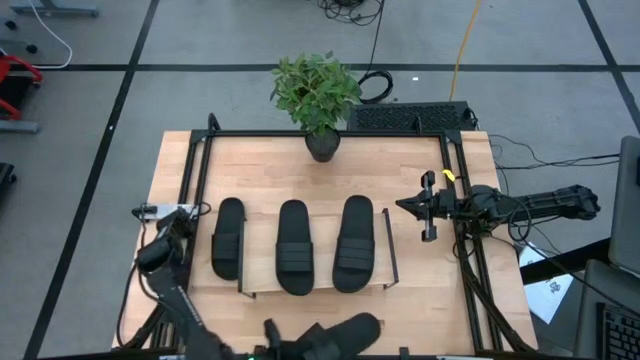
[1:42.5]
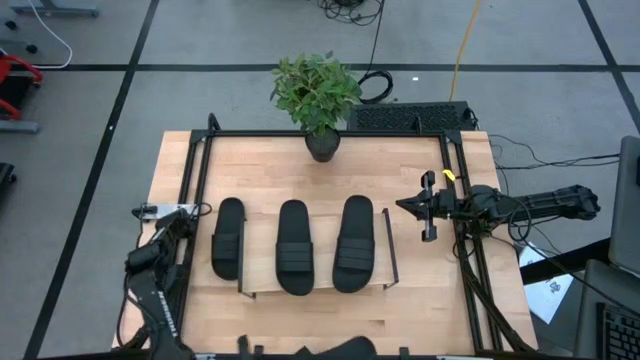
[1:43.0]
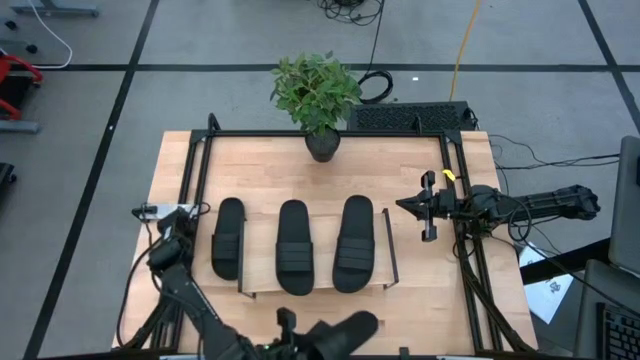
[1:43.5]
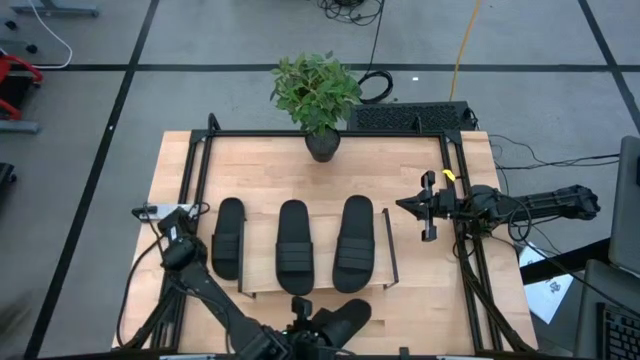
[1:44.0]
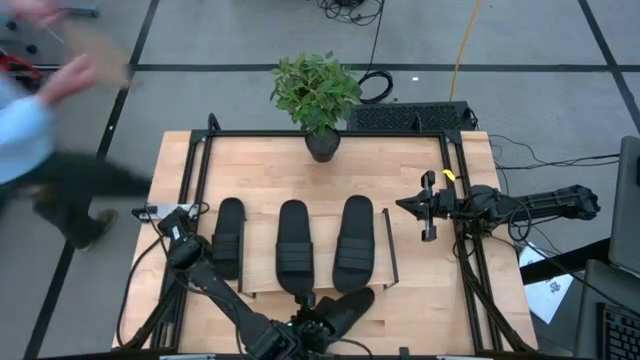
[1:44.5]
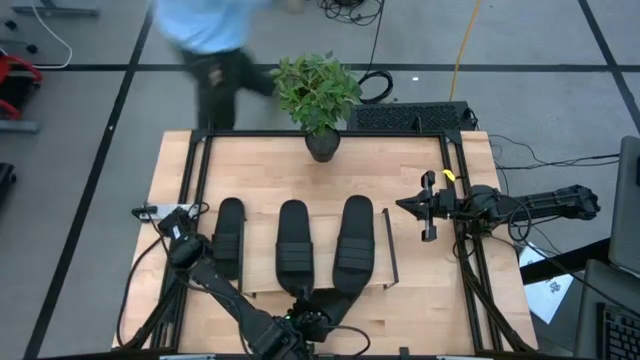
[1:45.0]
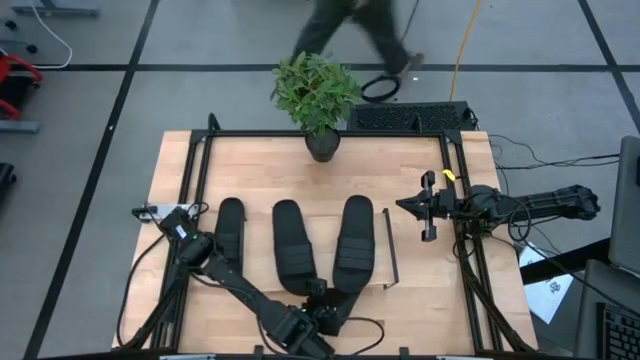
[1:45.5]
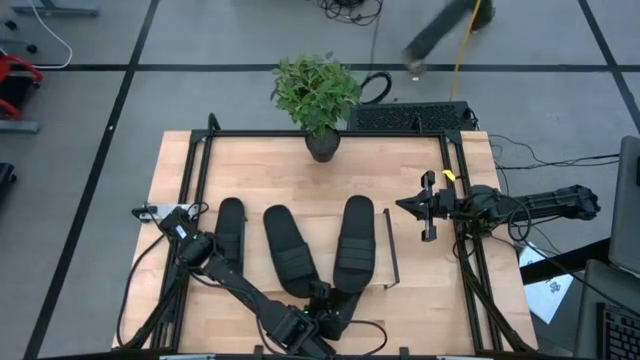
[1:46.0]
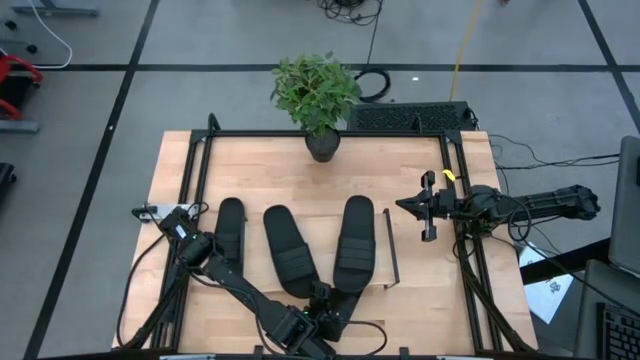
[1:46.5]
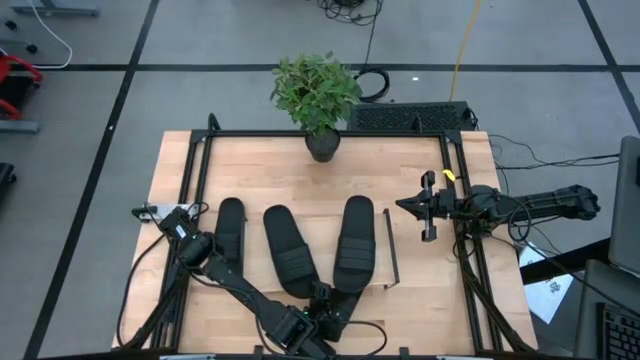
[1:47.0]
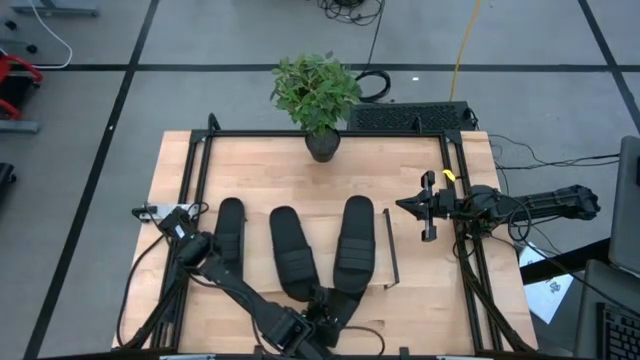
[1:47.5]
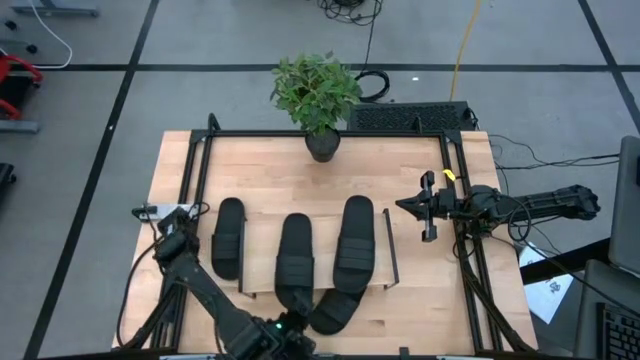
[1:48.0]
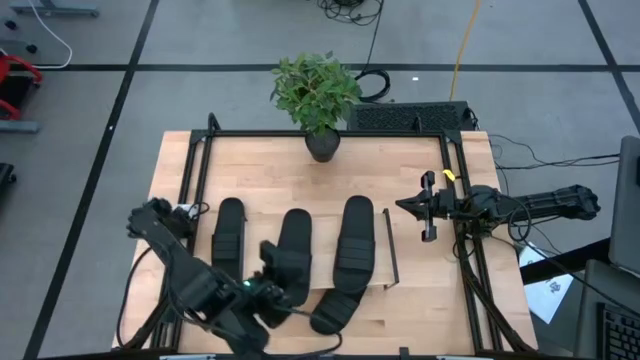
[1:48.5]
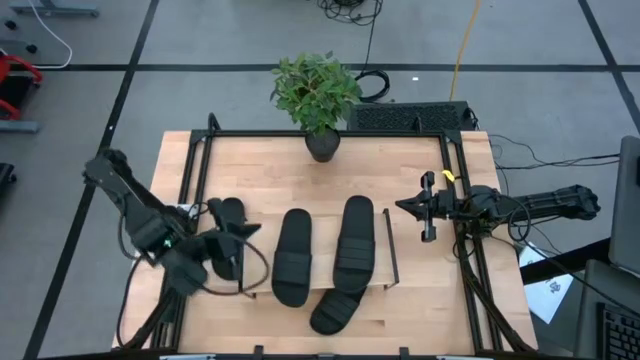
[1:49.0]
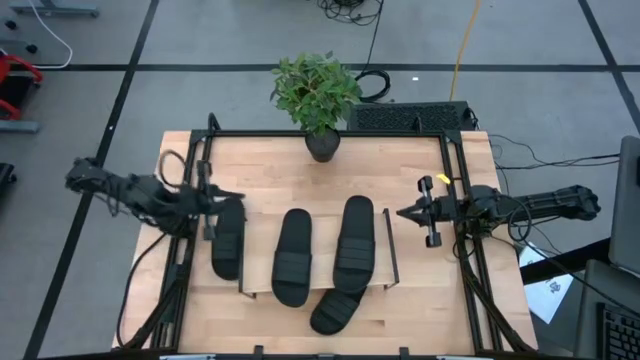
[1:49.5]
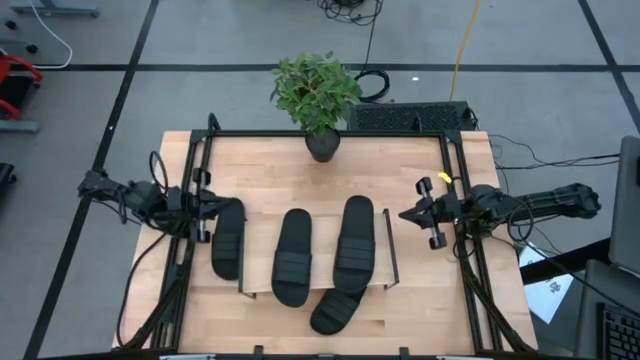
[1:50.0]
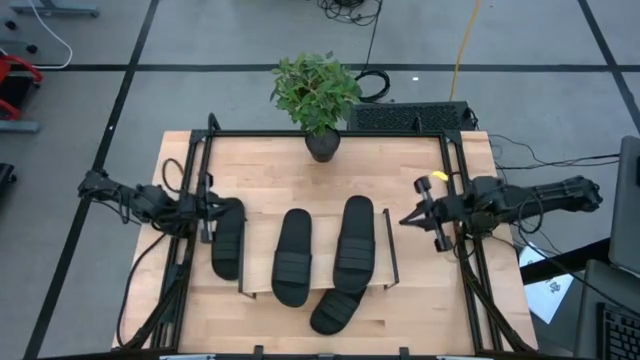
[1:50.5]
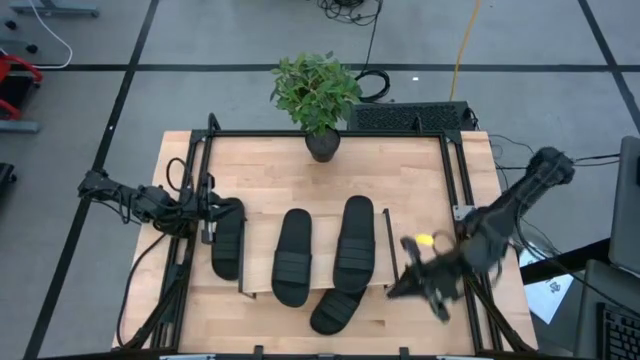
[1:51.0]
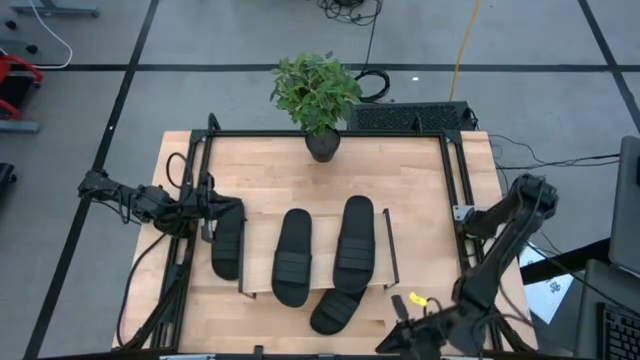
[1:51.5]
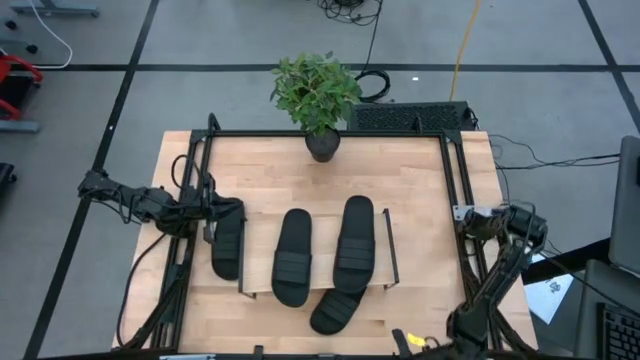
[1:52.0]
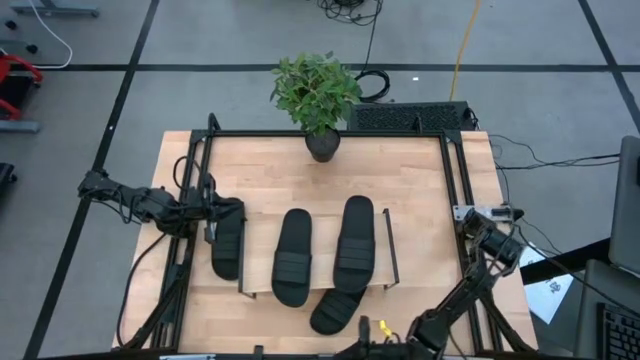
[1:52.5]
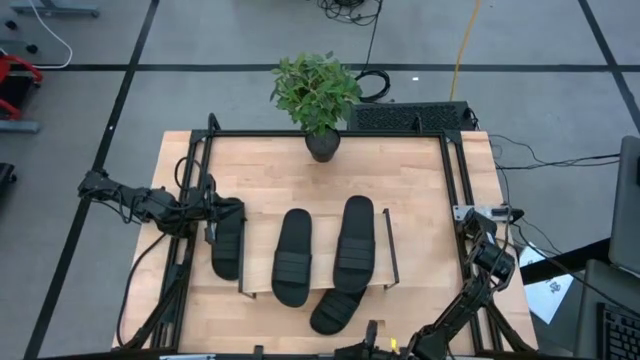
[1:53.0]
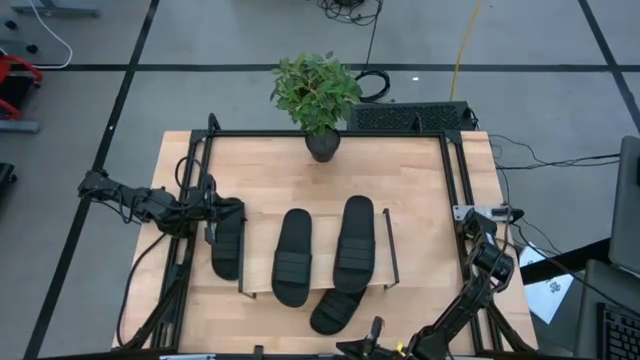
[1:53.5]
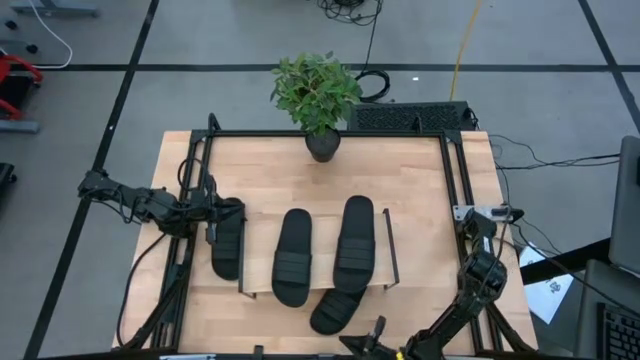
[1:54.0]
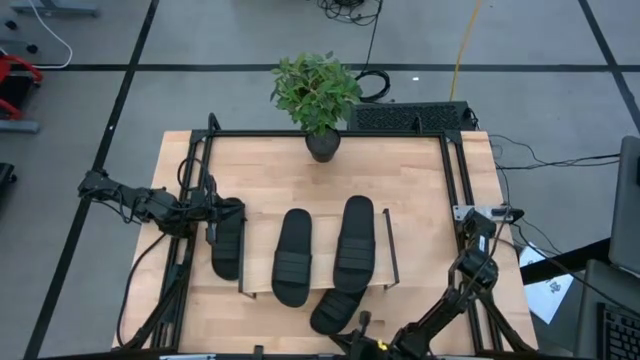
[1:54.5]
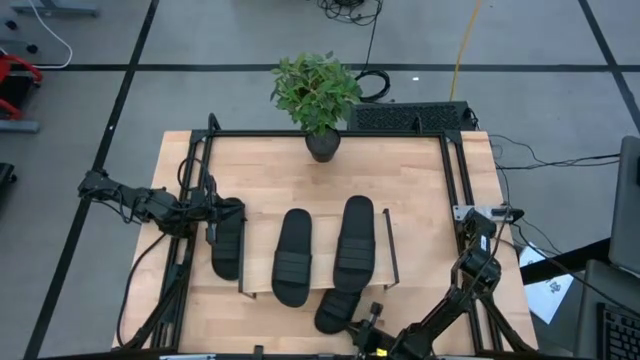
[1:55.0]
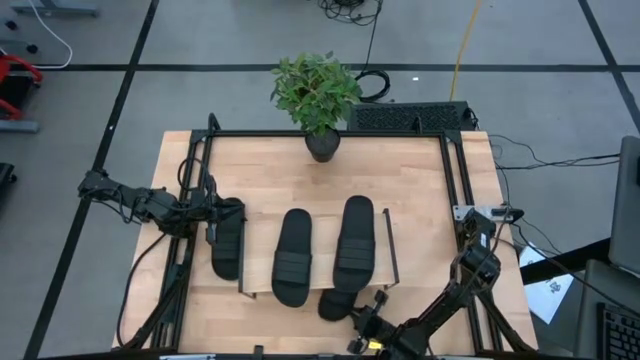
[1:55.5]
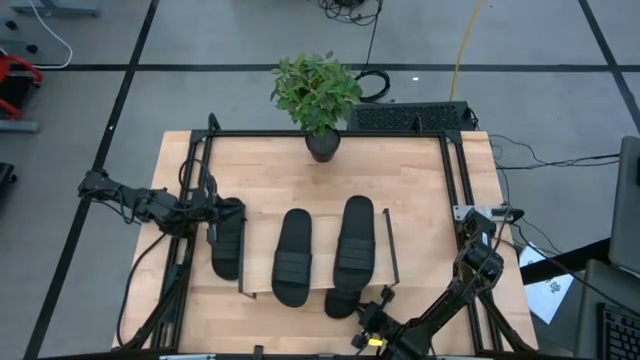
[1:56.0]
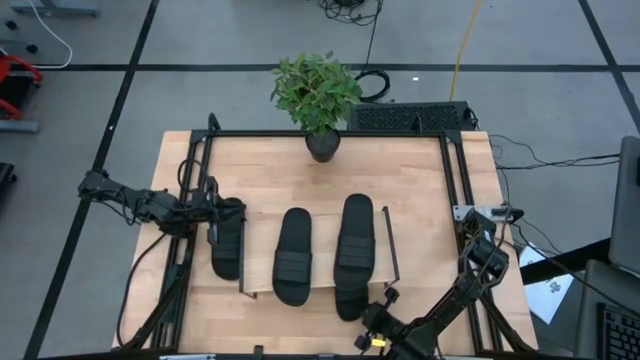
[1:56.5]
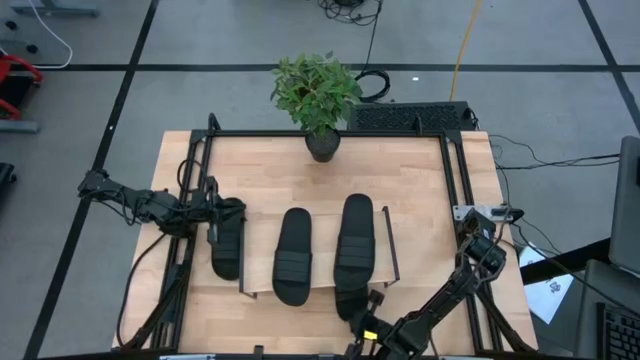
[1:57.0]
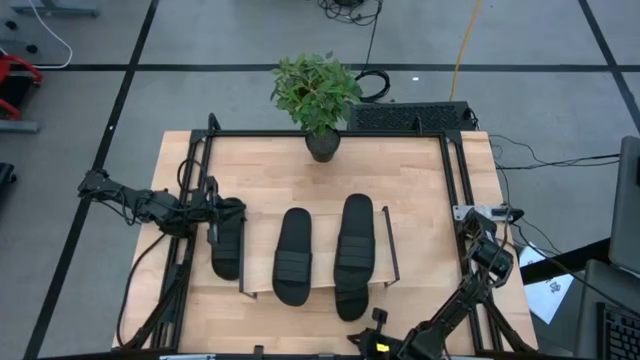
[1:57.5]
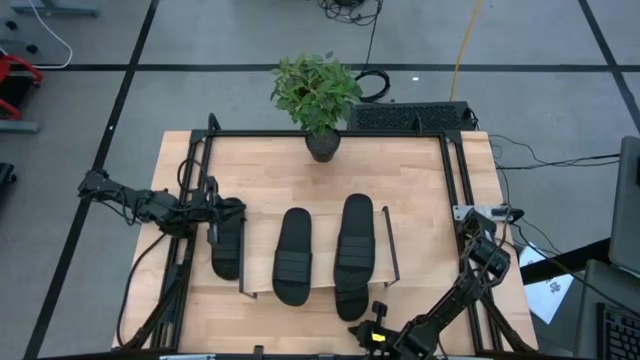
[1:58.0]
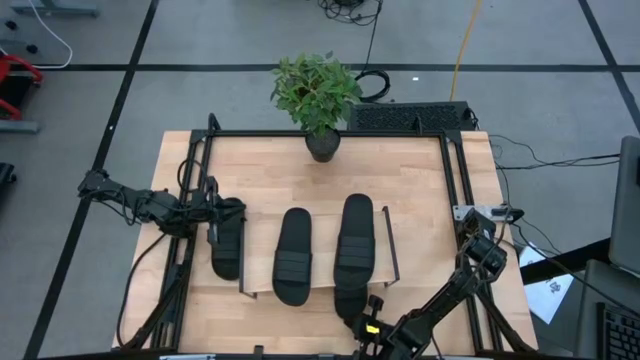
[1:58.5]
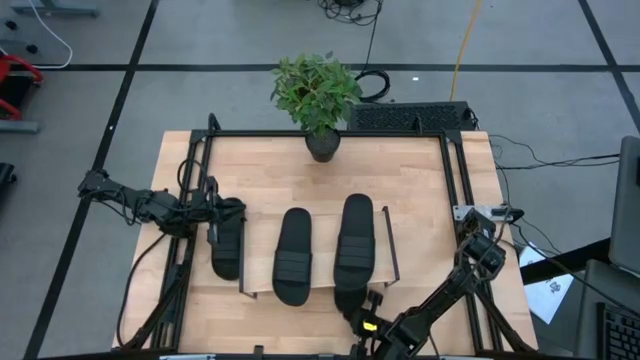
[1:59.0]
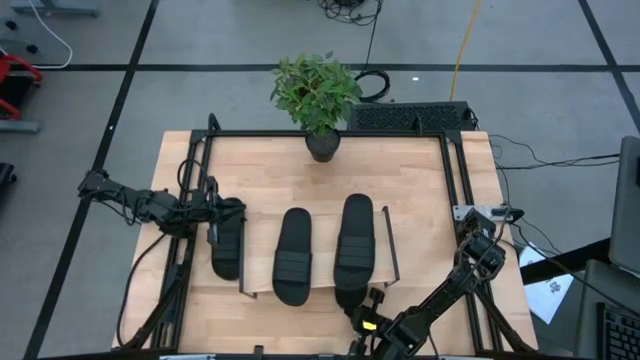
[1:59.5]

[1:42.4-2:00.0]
Task: Pick and place slides into the shelf
Put the black slipper under the shelf

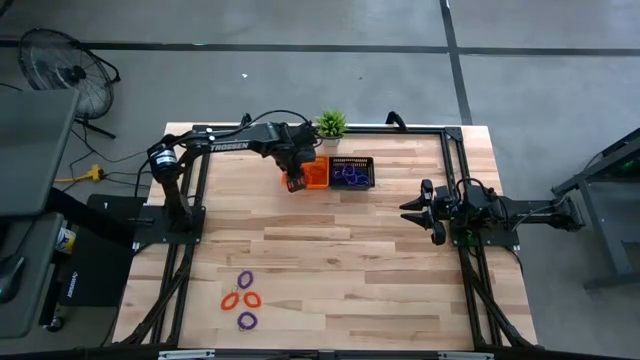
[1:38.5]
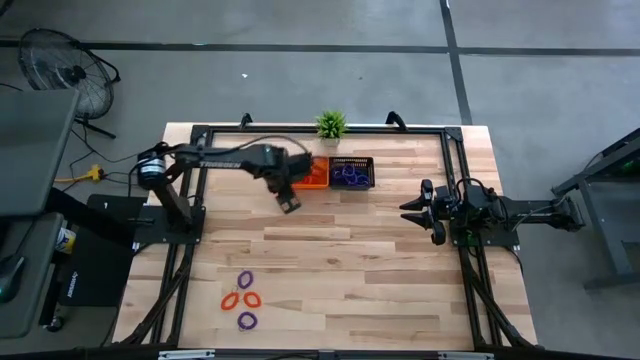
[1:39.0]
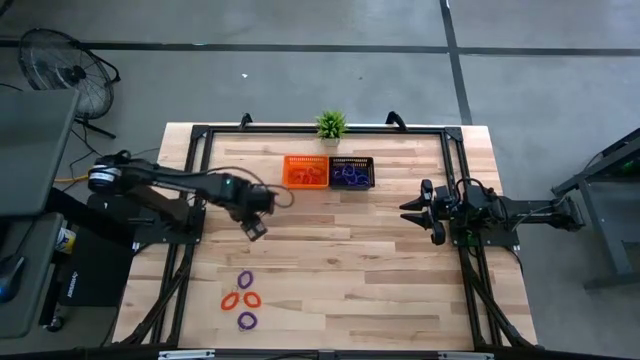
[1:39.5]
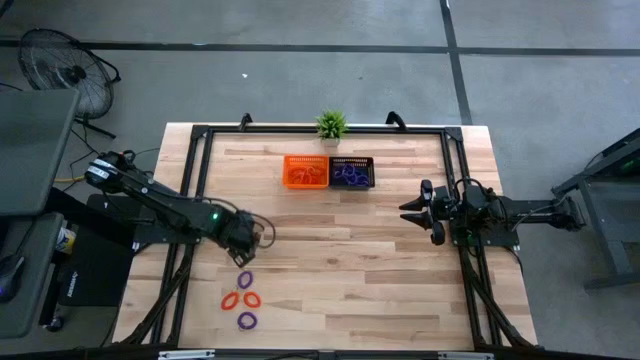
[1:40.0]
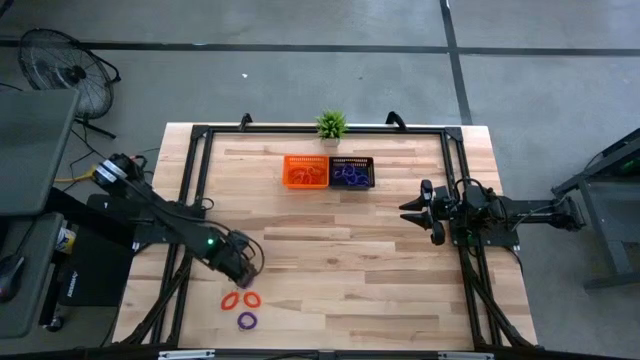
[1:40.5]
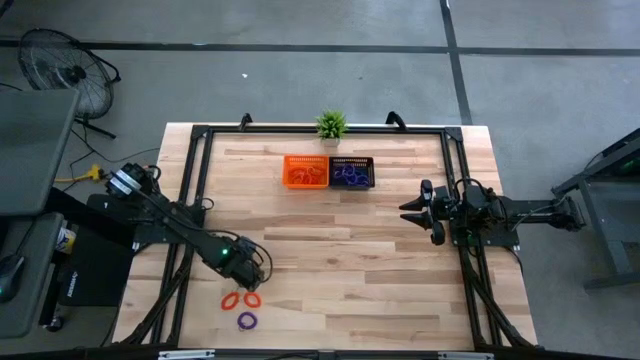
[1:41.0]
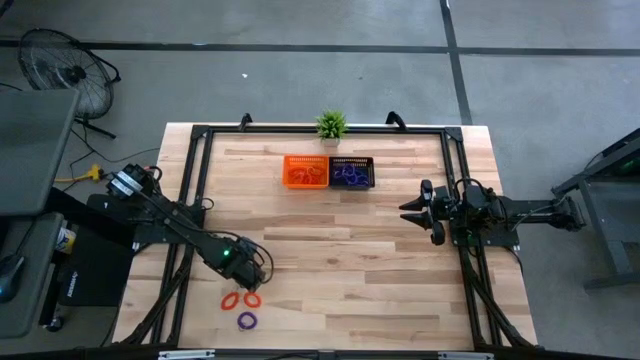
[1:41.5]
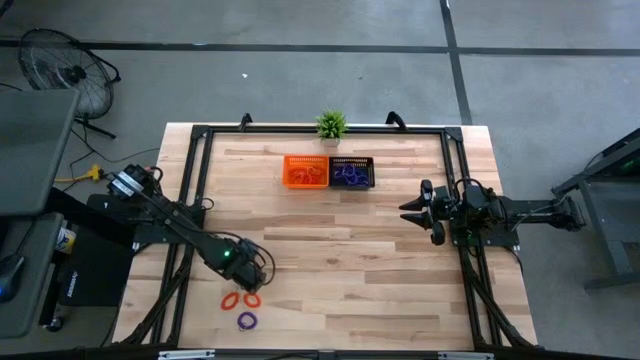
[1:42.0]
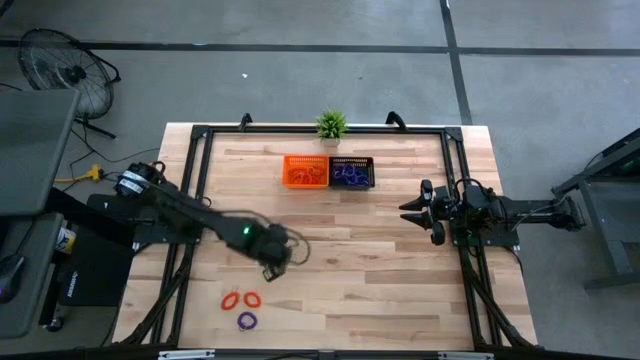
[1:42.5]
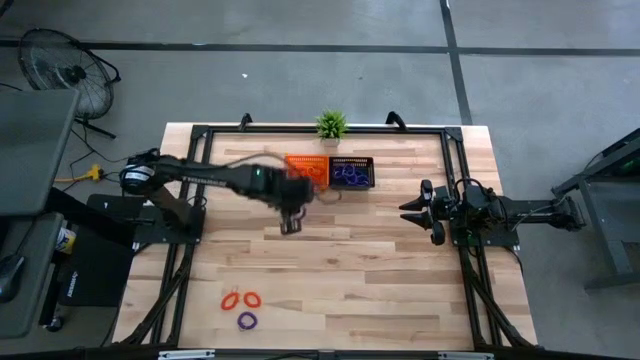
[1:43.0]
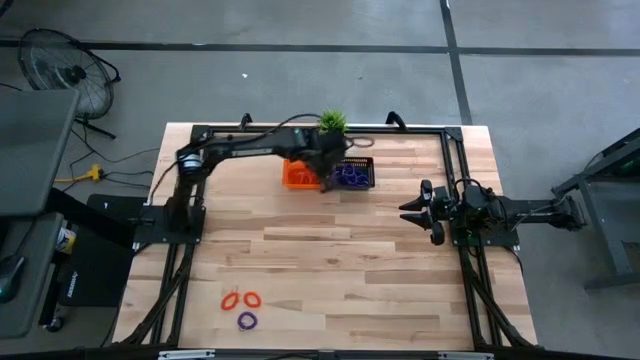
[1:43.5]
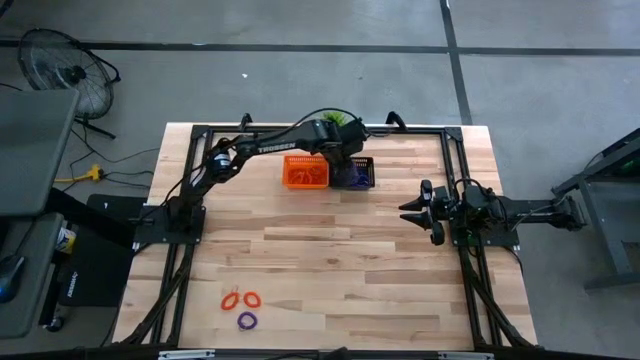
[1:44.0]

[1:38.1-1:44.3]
Task: Sort spring keychains into baskets
Put the purple spring keychain into the black basket
